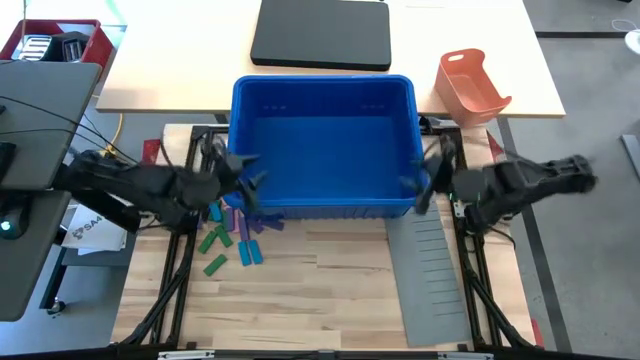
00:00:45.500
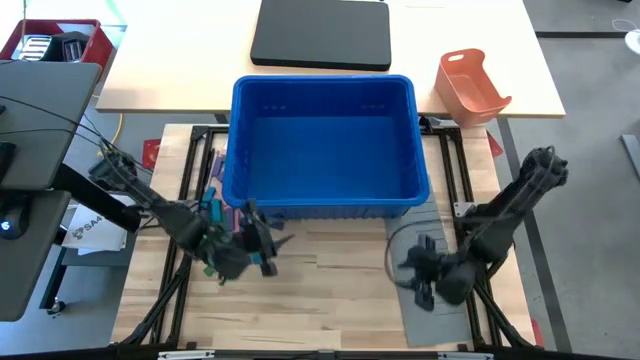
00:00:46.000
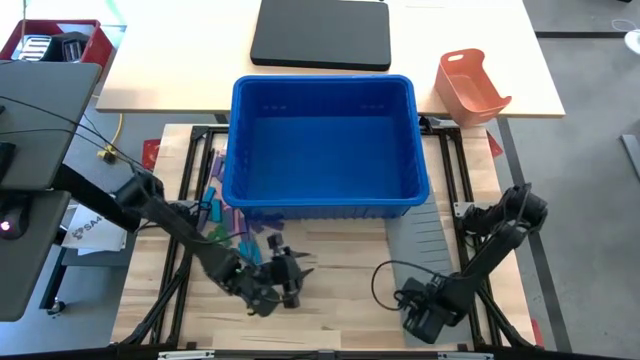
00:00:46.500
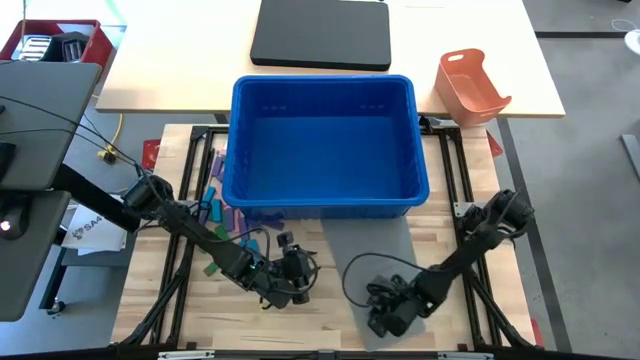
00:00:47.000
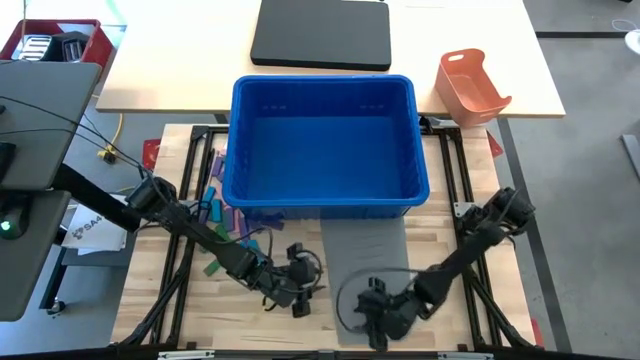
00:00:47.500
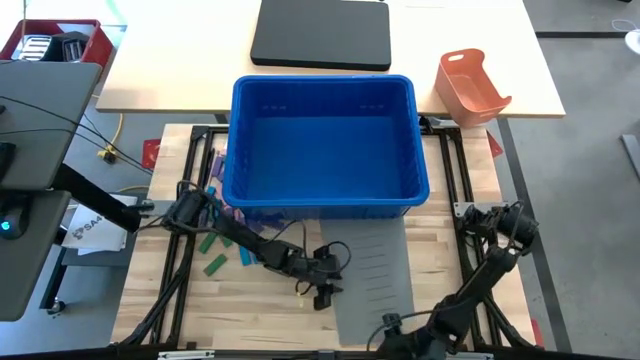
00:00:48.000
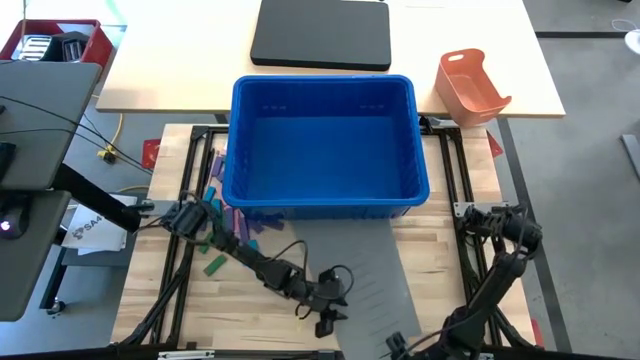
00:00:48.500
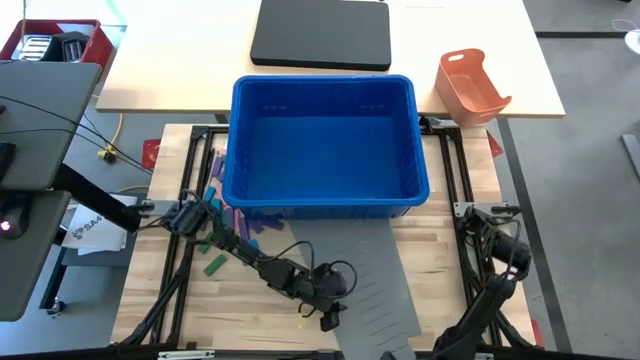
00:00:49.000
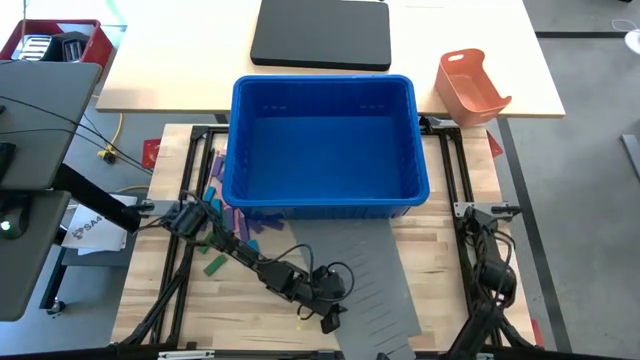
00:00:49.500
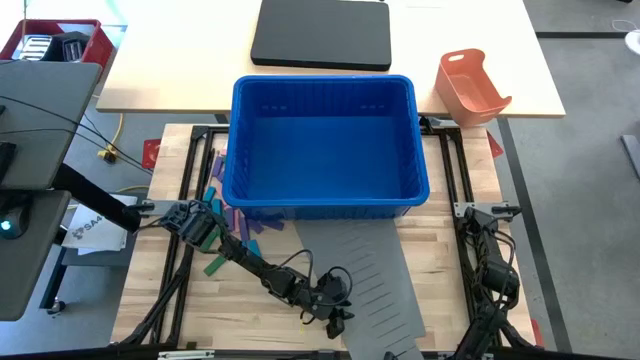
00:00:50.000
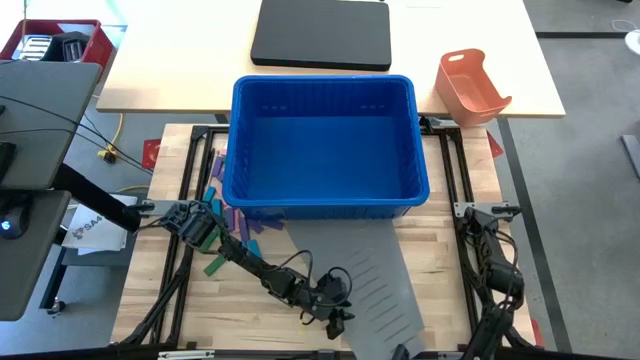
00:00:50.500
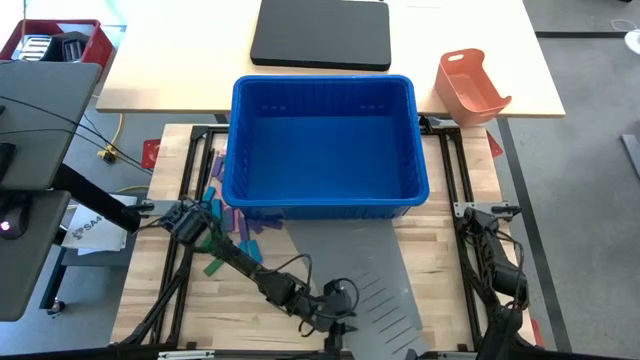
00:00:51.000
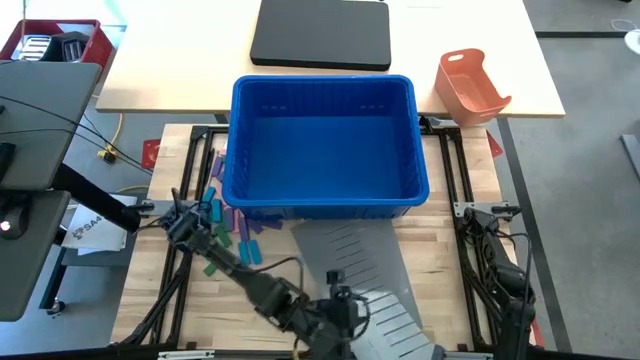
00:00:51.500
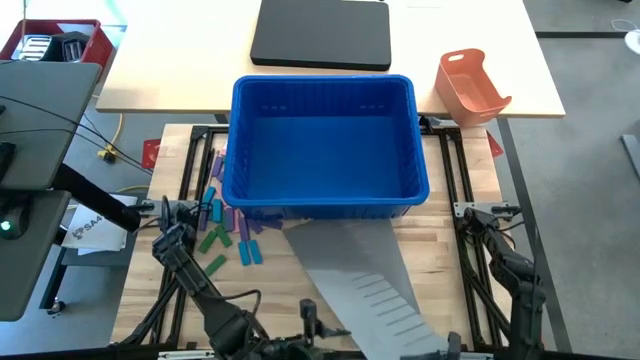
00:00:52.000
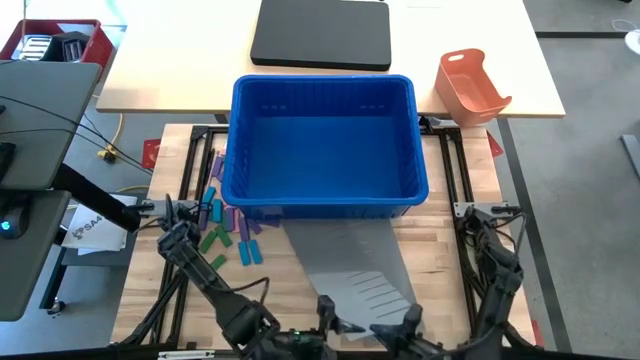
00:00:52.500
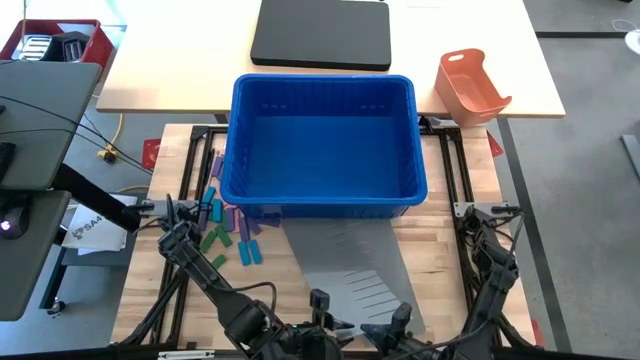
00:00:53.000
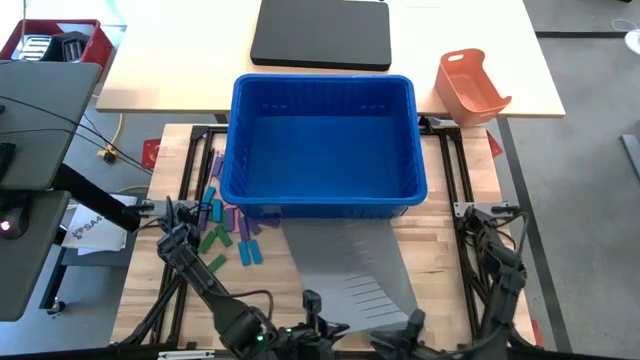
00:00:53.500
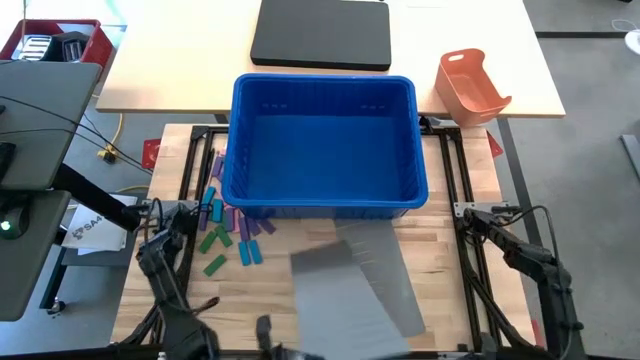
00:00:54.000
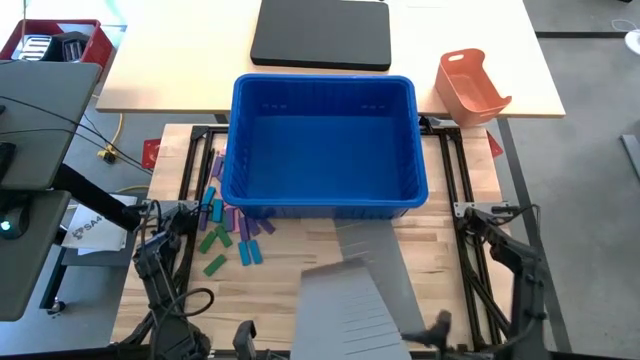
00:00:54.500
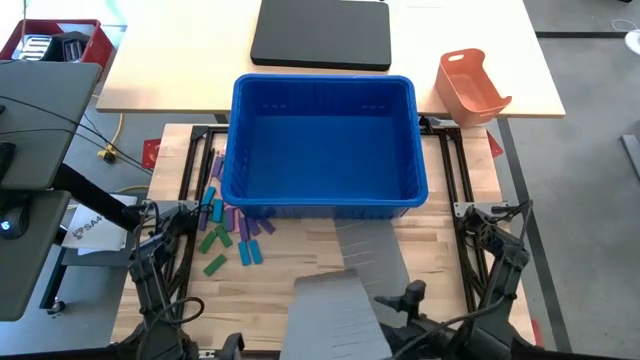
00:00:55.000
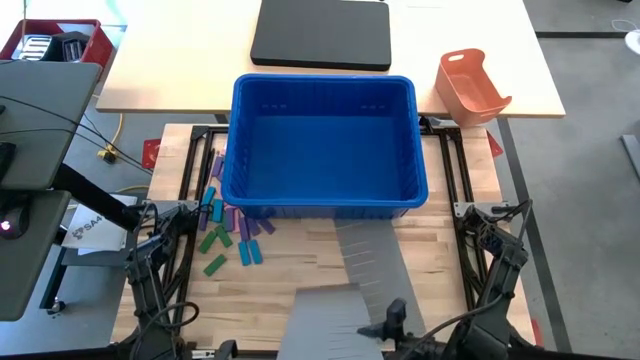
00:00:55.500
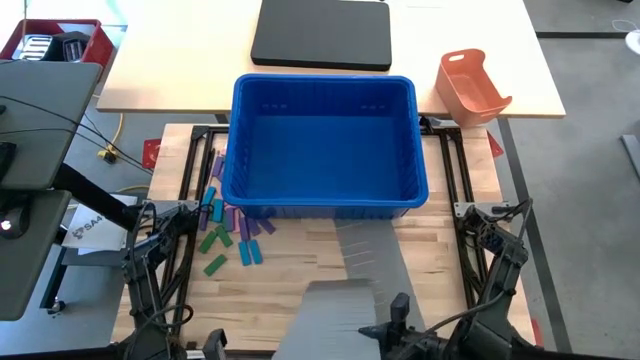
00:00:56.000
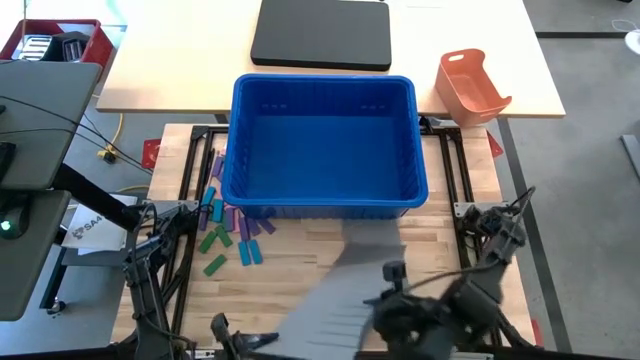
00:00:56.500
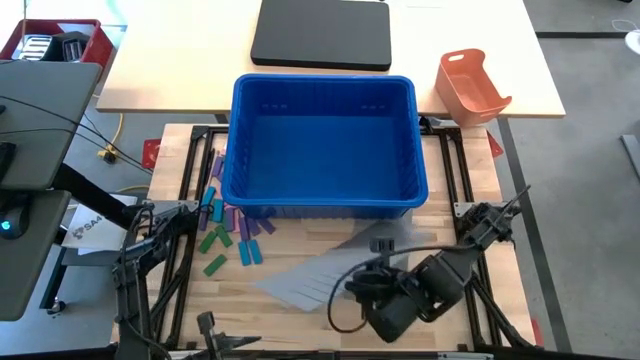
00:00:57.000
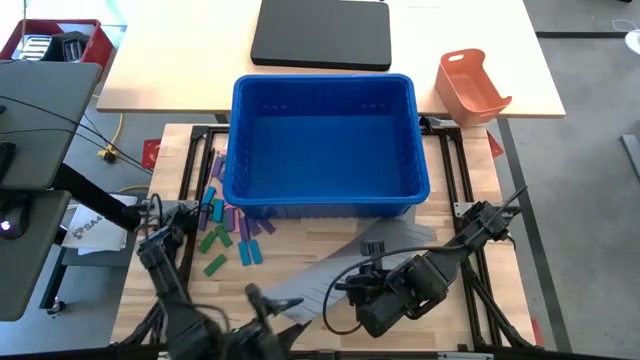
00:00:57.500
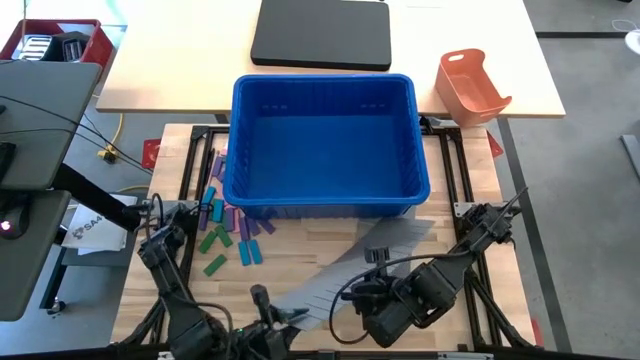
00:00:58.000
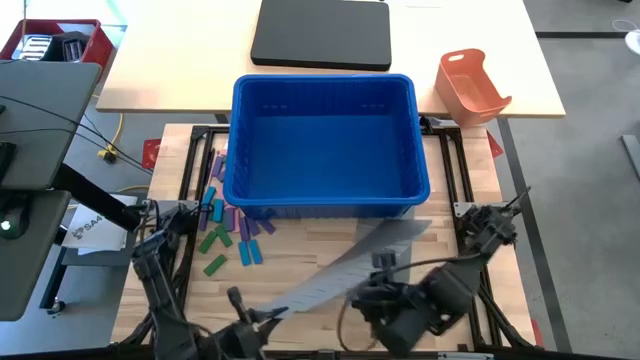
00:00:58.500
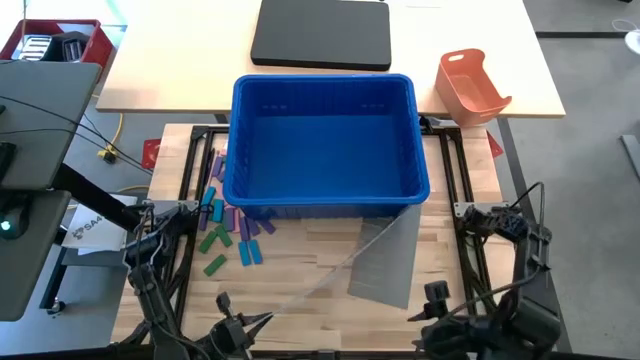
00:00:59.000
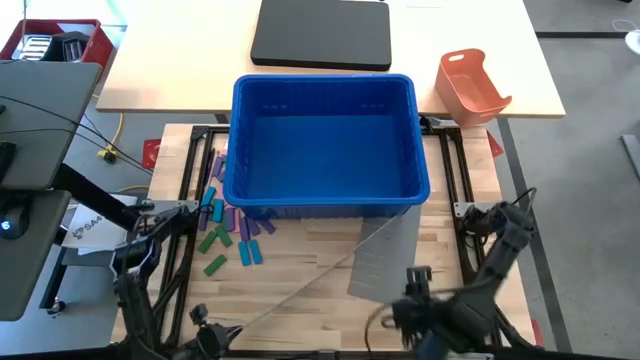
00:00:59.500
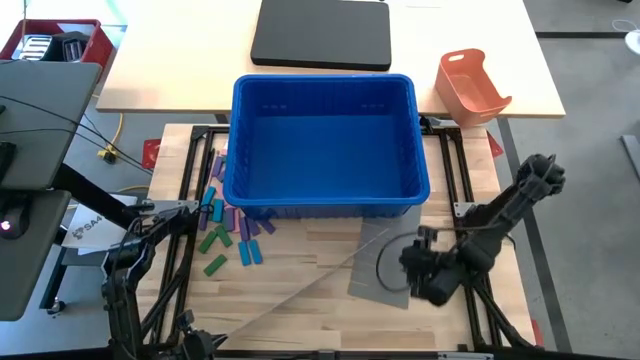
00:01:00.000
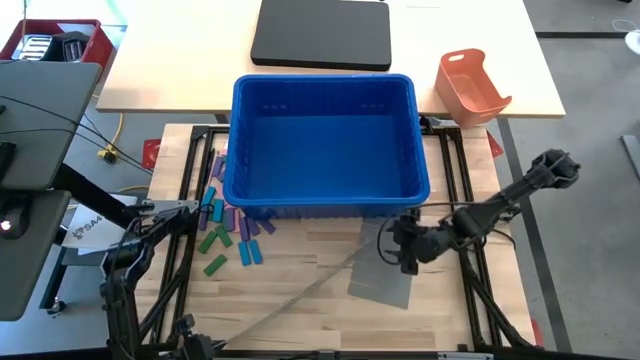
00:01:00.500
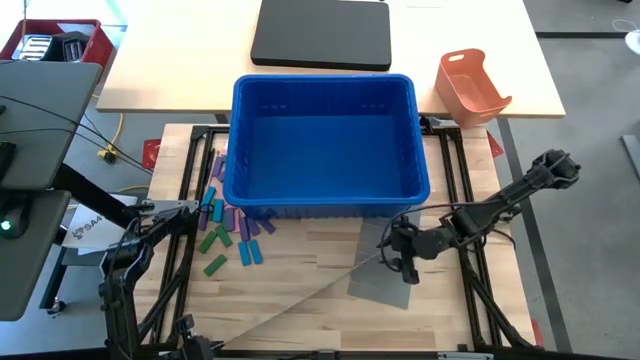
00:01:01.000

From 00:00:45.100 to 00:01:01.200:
Task: Sort blocks
Insert the bin divider into the blue bin

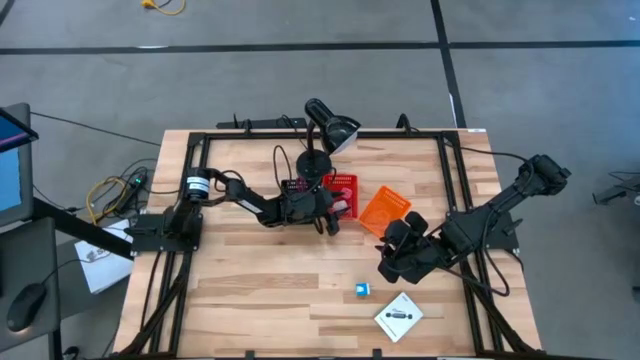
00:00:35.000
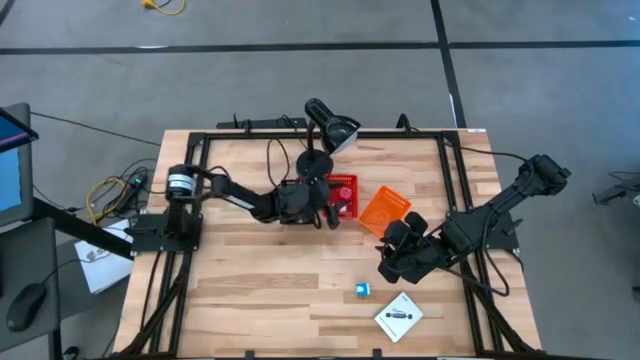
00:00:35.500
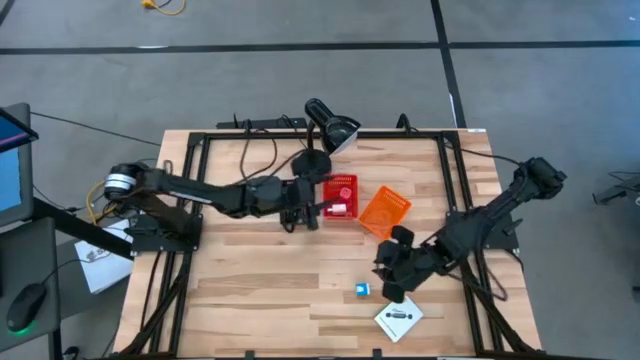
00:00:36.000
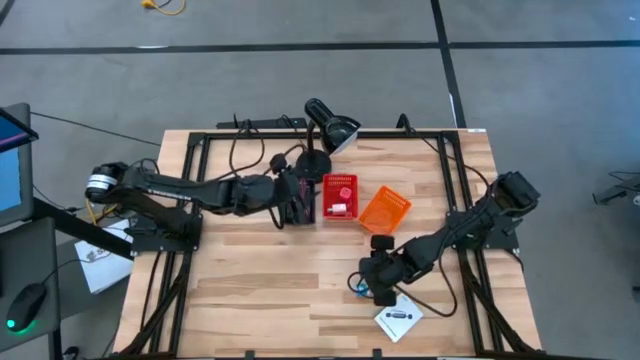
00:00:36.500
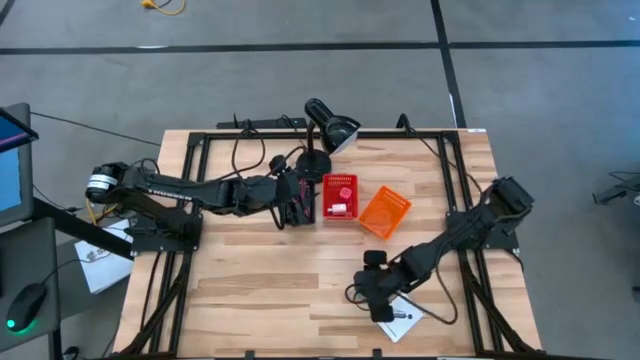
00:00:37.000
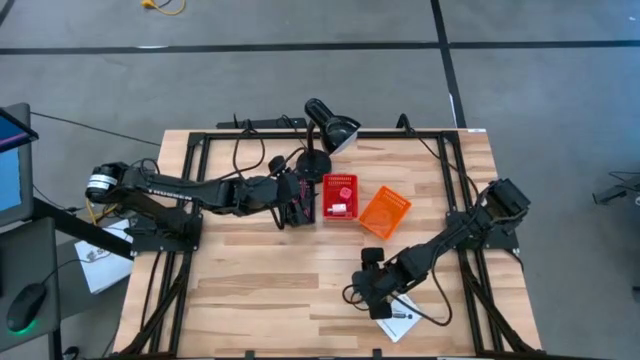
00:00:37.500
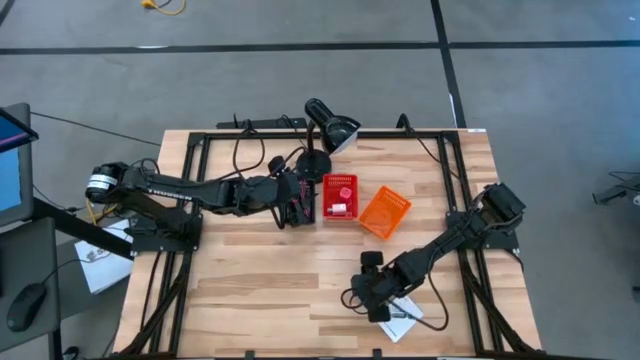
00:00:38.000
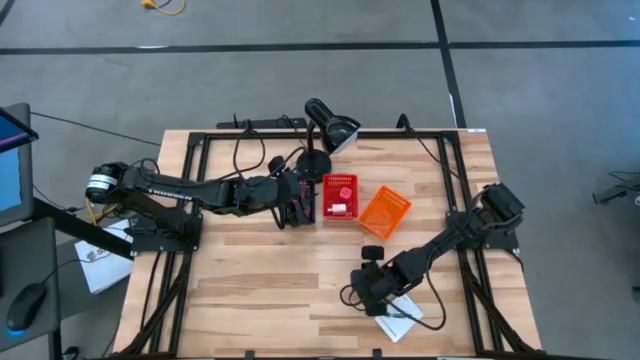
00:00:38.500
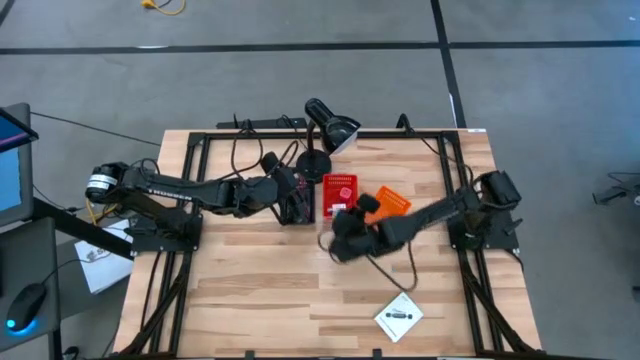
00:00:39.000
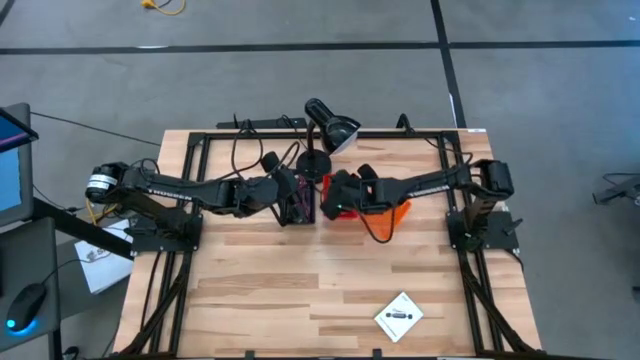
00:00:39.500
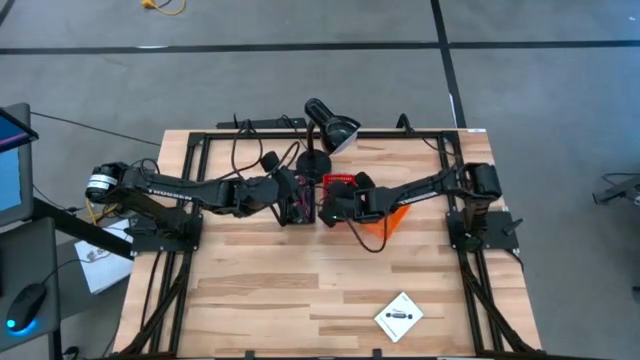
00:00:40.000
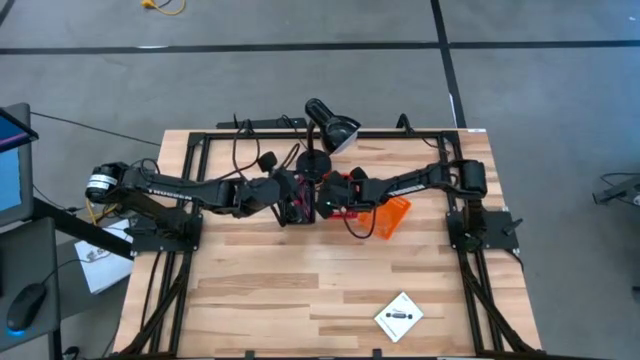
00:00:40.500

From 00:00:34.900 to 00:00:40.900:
Task: Pick and place items into bin
Put the blue charger adapter into the red bin
